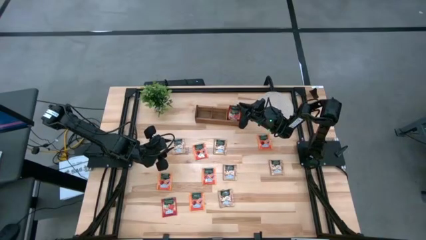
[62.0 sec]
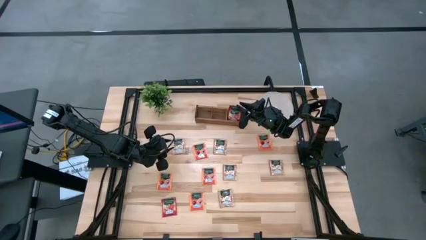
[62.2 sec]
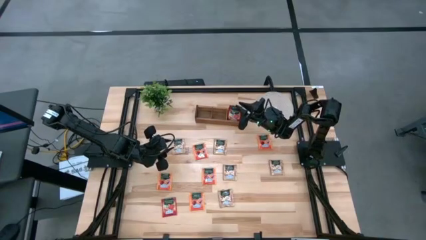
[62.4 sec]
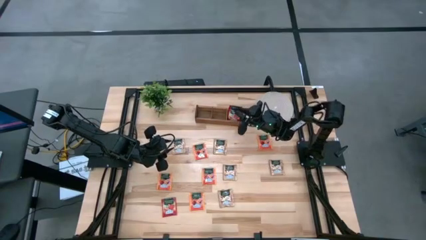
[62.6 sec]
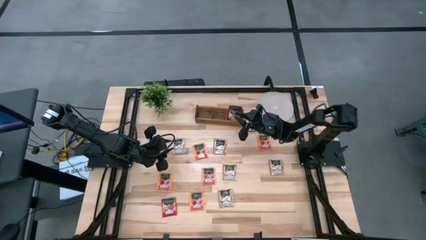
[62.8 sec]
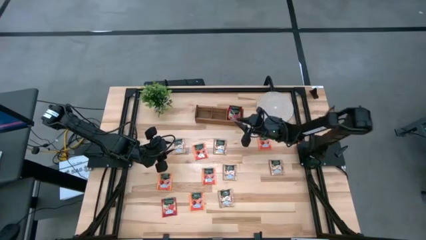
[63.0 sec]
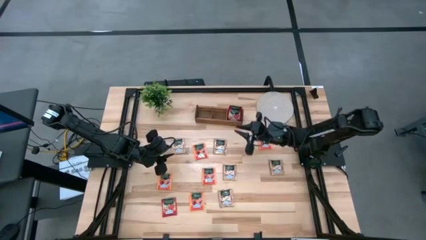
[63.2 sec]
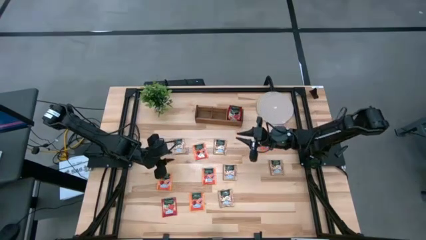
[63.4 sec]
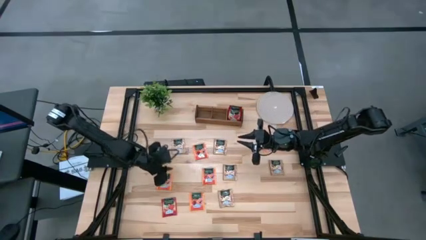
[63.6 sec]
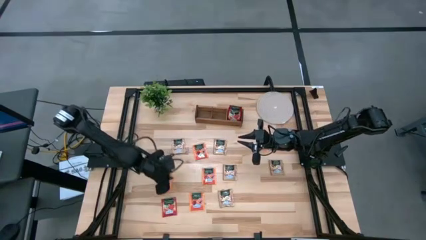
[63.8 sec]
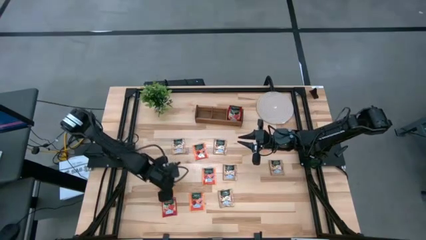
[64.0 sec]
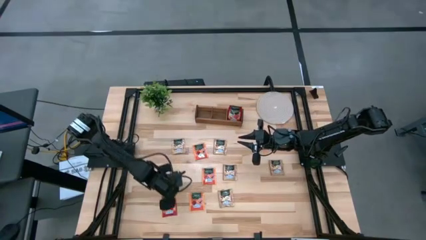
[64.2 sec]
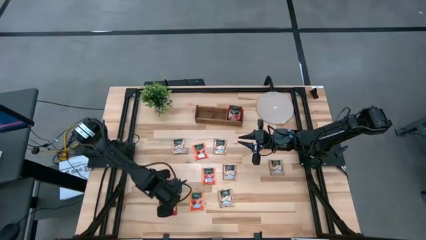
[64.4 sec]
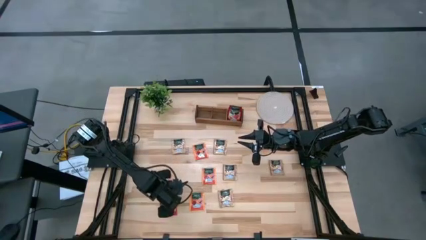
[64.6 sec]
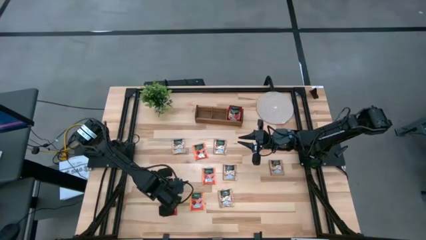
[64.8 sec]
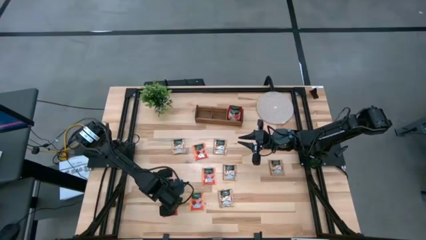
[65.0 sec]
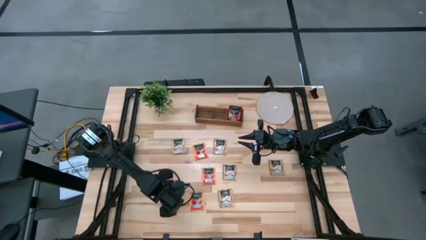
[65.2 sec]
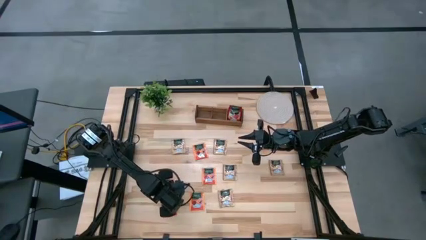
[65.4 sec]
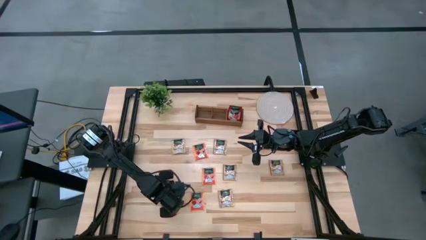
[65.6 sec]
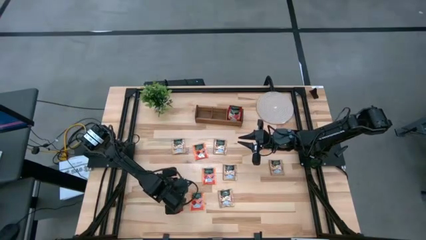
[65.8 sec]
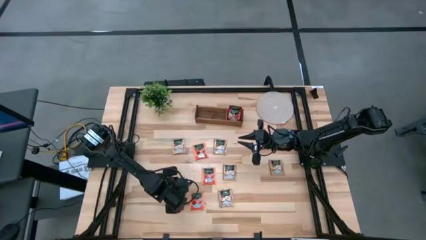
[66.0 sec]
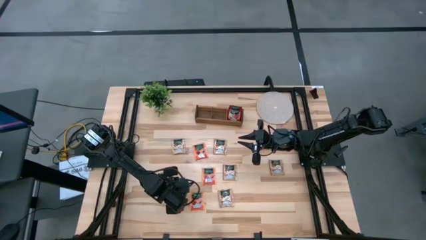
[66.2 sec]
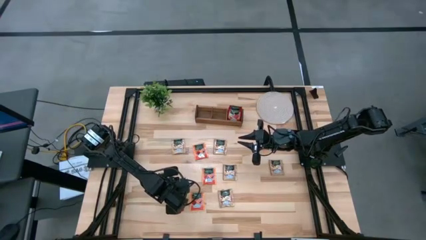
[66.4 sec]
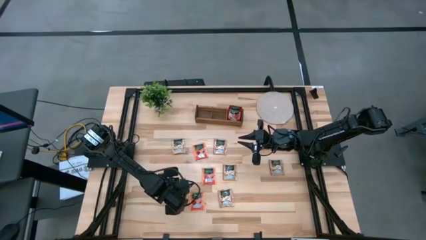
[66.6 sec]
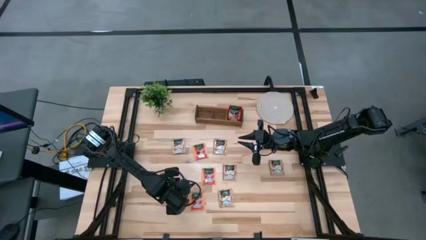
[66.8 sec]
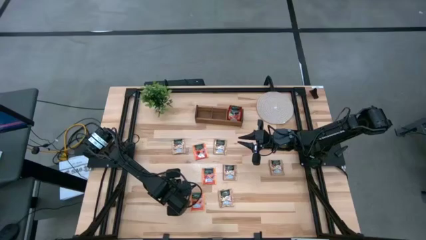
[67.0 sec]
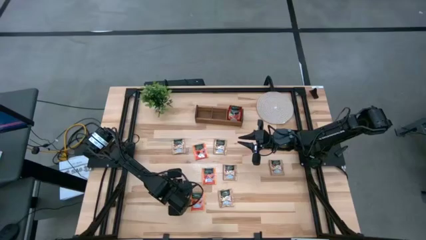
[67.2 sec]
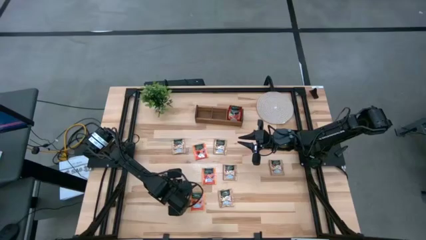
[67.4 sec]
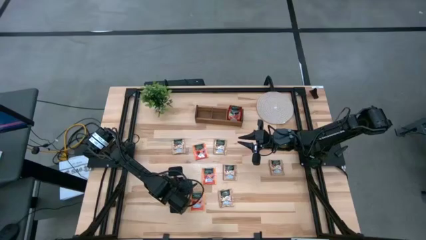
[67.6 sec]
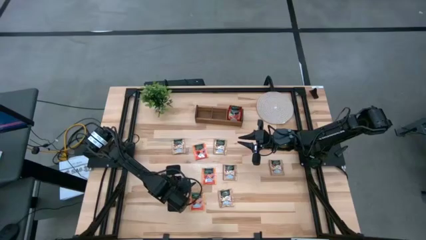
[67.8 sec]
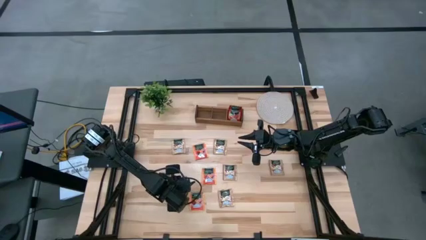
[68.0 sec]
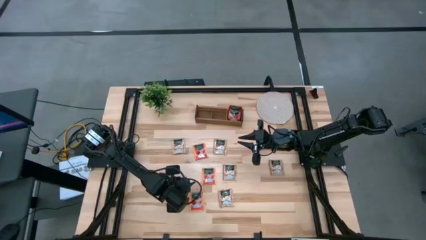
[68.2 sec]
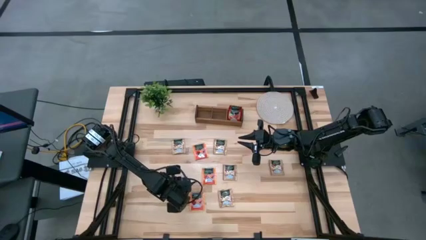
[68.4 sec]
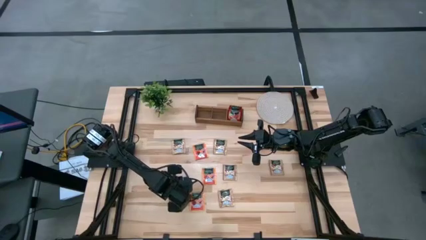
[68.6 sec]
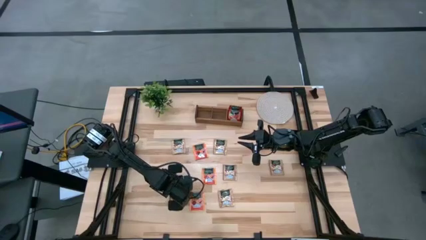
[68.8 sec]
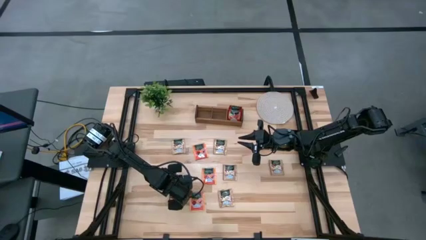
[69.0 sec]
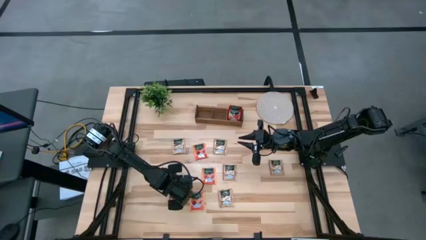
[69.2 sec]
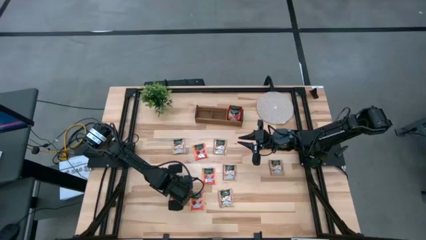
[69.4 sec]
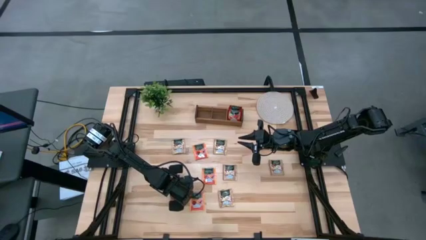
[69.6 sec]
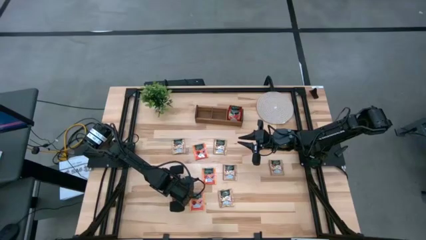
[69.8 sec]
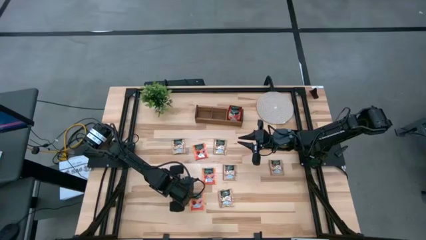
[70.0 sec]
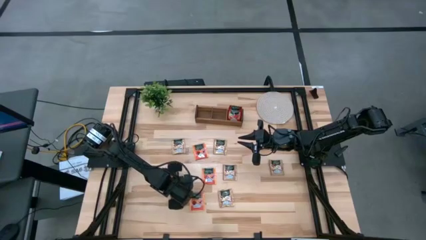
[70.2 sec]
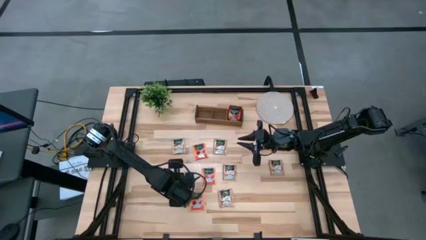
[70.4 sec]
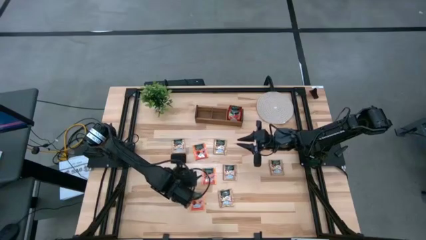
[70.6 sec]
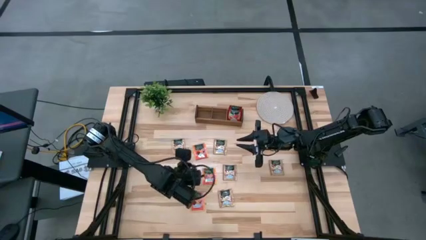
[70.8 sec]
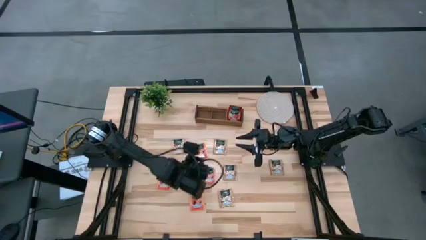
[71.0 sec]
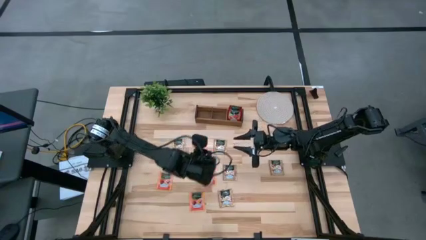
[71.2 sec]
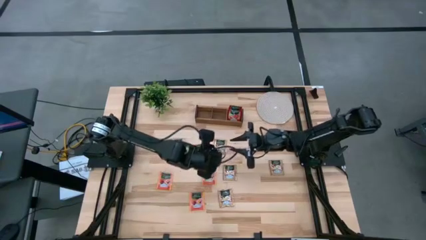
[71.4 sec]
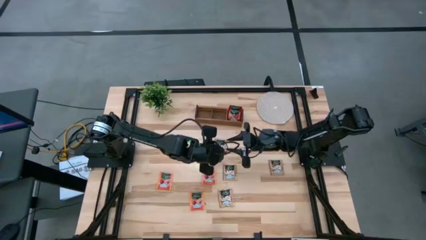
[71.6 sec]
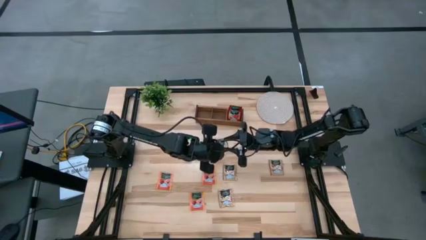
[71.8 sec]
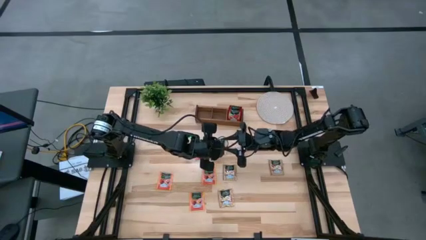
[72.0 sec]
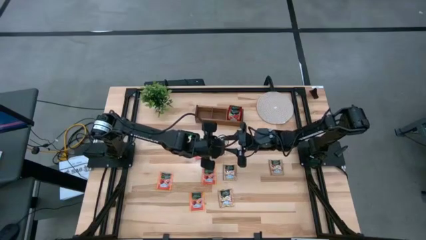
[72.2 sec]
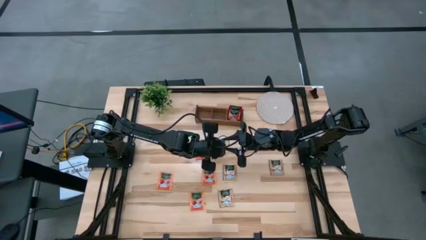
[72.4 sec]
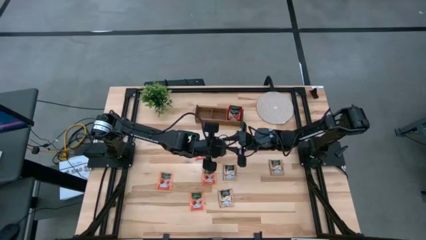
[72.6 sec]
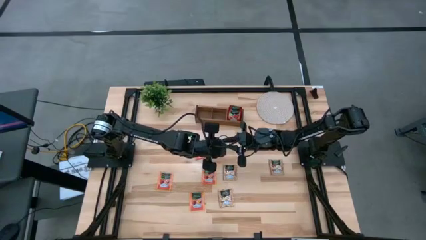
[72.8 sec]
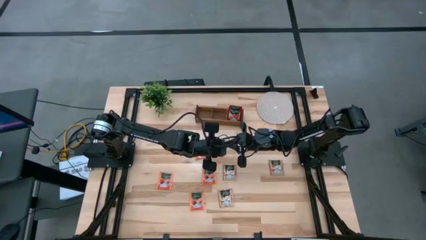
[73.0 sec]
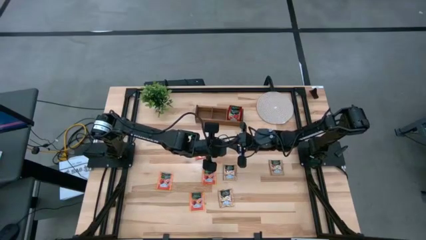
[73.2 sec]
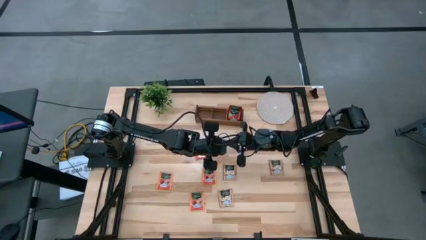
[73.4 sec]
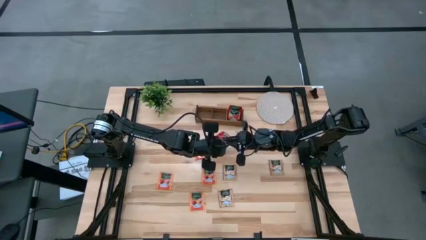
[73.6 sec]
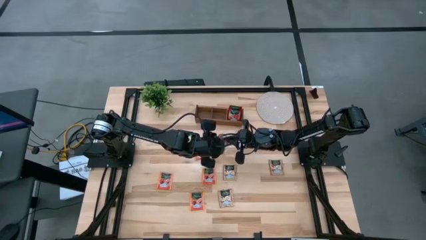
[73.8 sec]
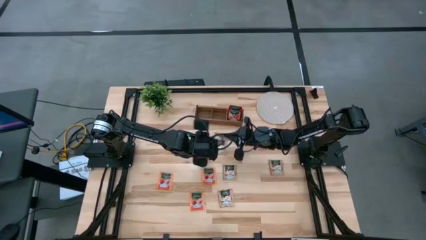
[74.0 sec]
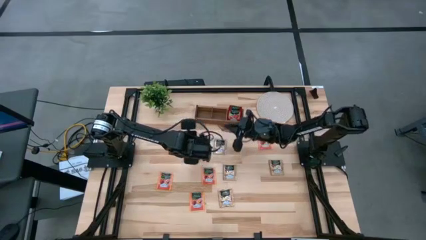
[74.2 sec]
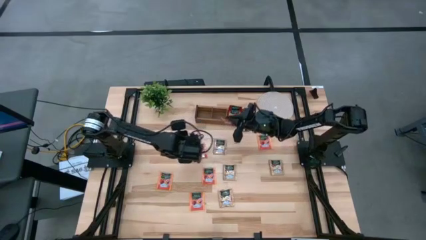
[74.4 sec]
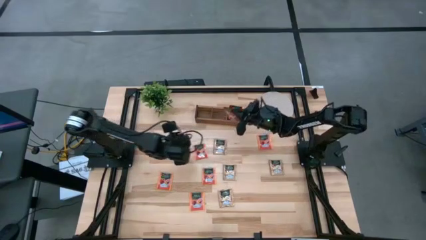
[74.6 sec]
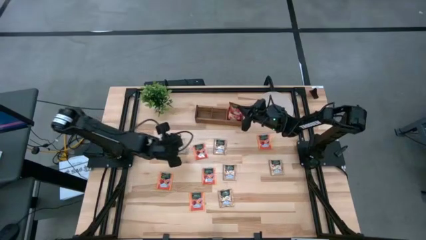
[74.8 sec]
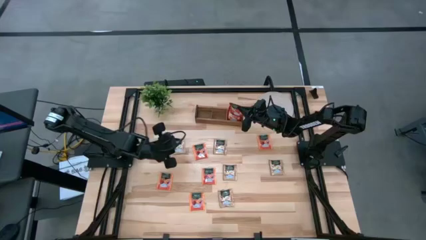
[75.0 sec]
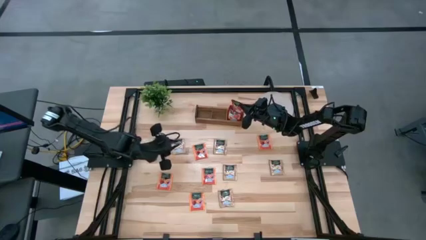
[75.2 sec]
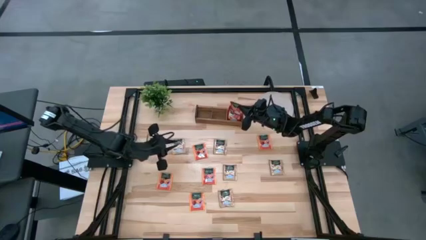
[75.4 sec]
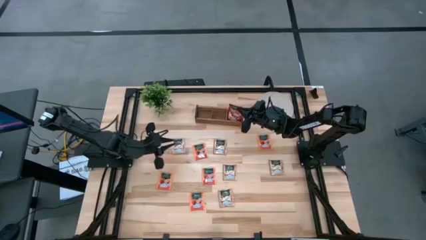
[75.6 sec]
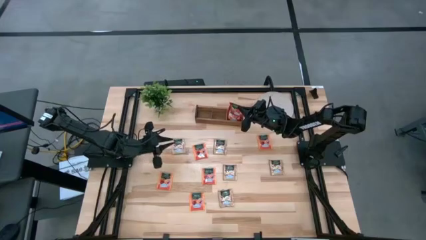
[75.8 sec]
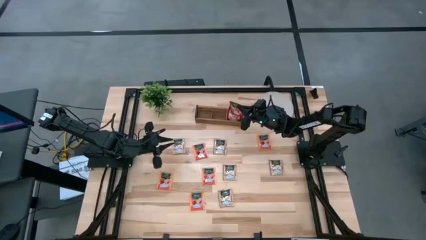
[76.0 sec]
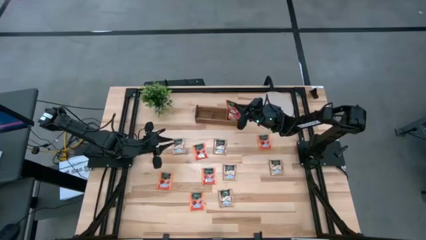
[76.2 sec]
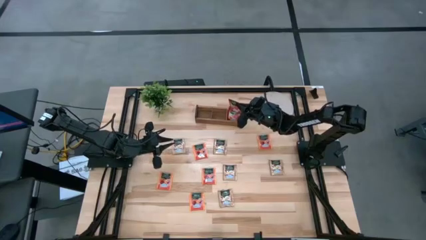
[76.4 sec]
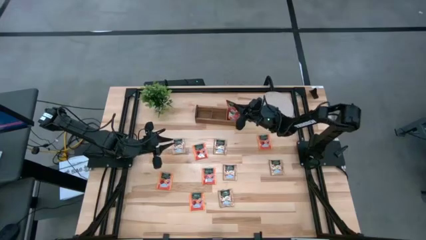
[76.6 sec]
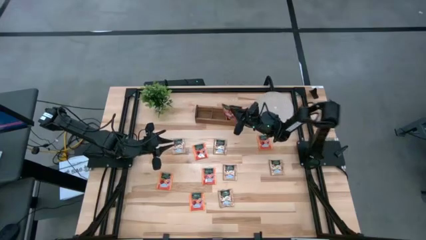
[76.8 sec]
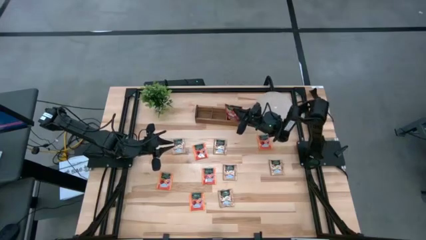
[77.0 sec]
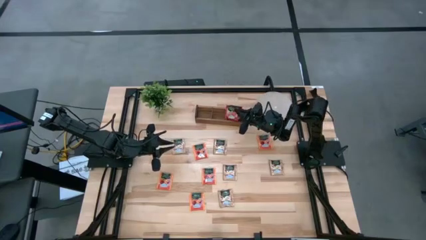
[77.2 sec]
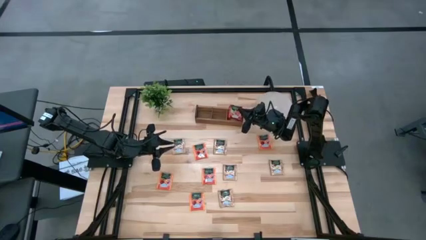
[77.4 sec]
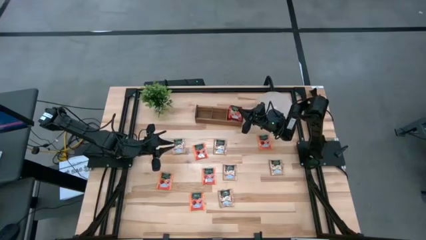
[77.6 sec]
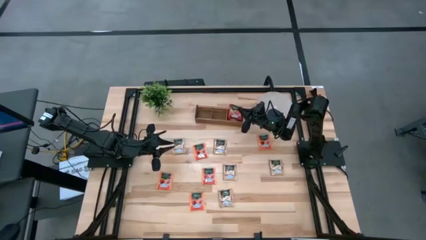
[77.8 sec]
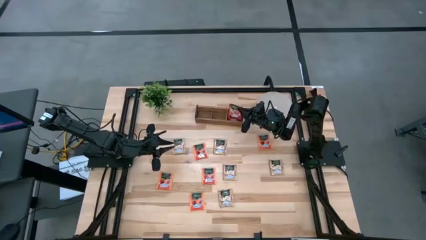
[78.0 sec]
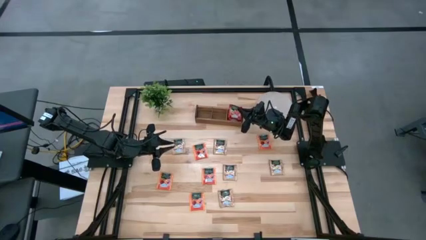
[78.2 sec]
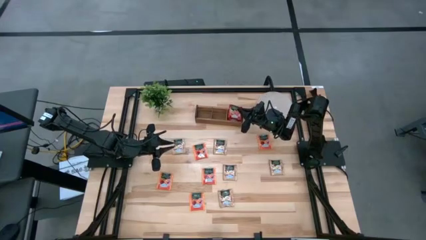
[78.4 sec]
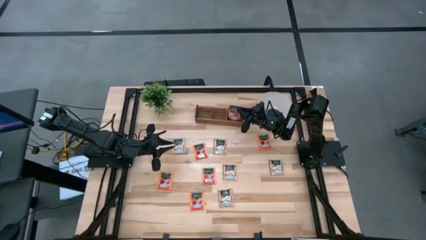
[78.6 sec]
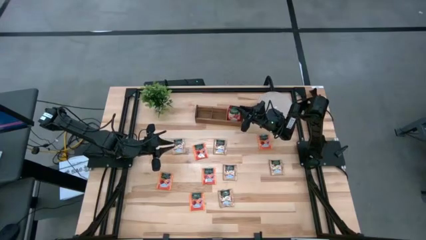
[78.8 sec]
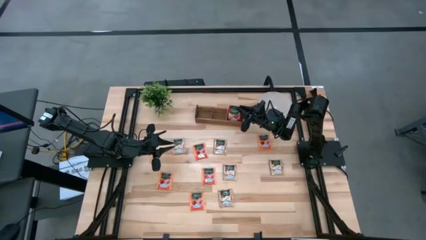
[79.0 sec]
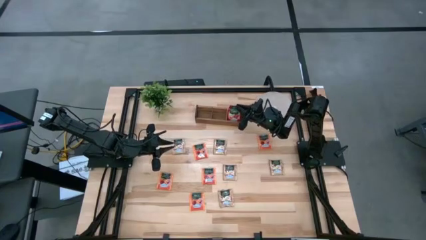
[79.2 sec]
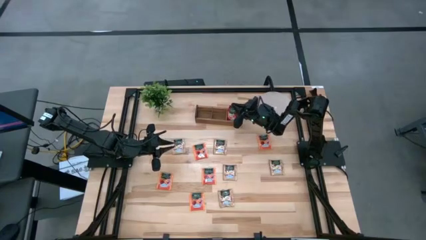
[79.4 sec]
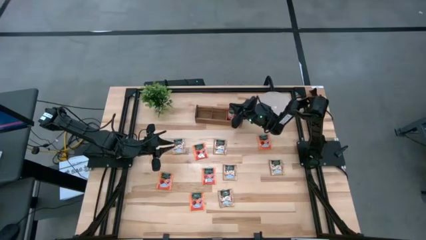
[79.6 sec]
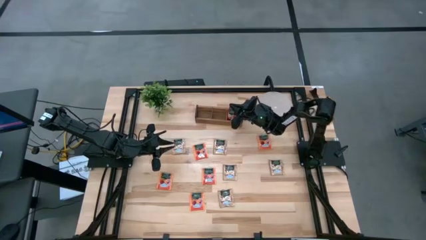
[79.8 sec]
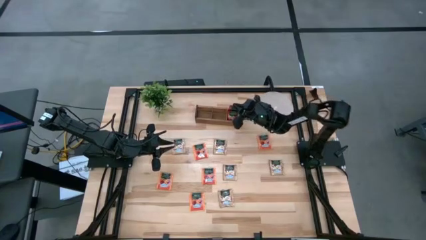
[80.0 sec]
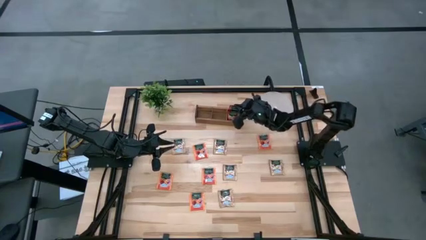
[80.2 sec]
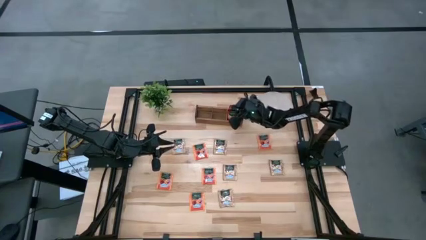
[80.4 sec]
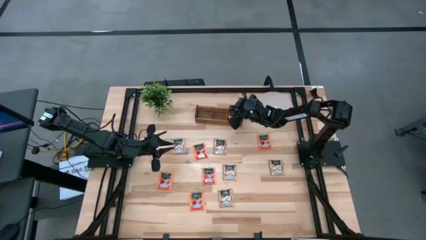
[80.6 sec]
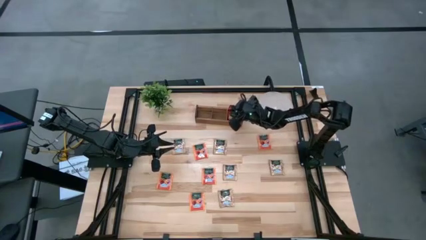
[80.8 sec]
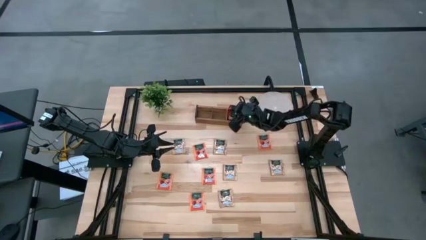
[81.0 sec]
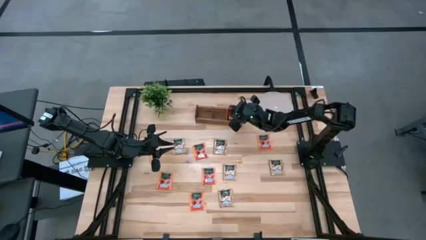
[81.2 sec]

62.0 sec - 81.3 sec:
Task: Pick & Place Tea
Put the red tea bag into the right section of the wooden organizer
